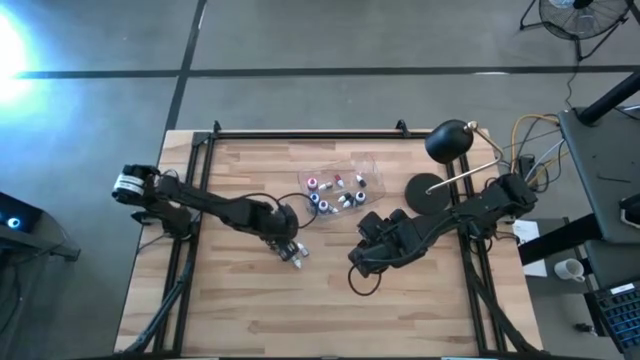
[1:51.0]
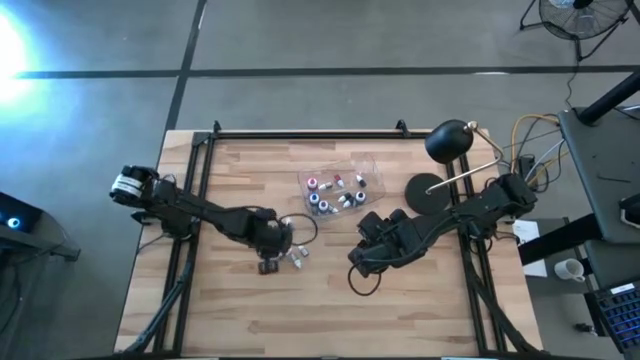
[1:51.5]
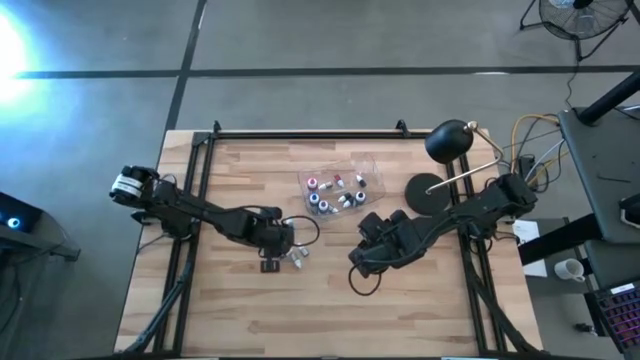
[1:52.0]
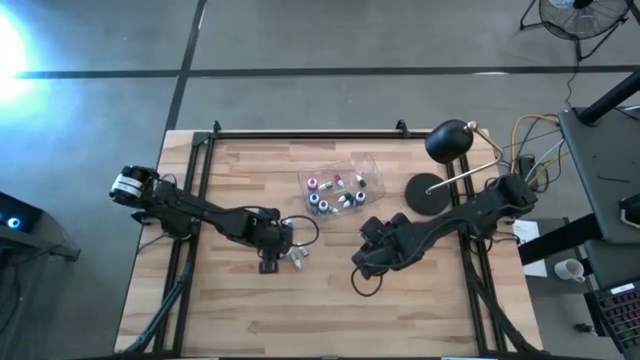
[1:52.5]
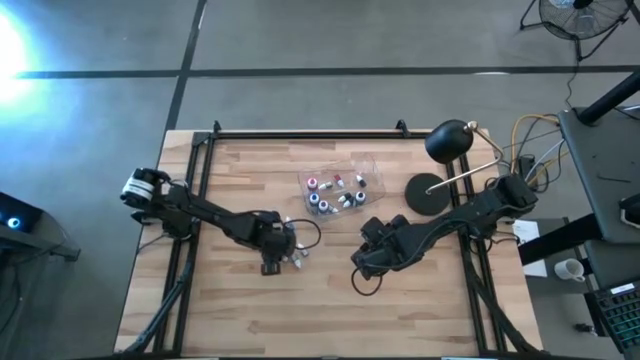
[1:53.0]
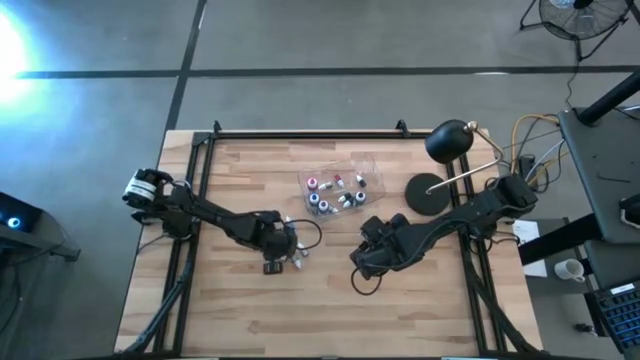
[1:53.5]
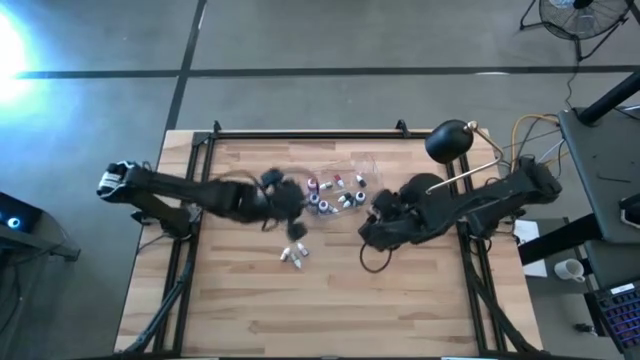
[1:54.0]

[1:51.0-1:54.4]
Task: Pick & Place food coloring
Put the small black food coloring bottle into the transparent bin

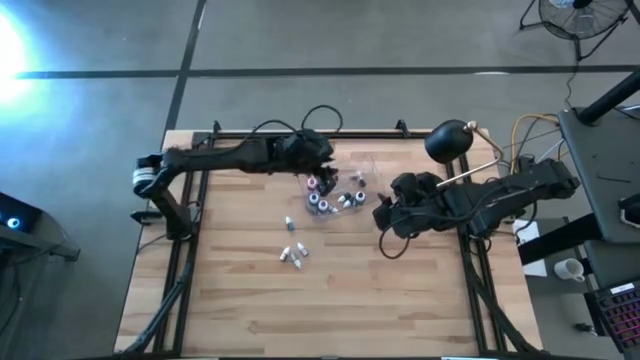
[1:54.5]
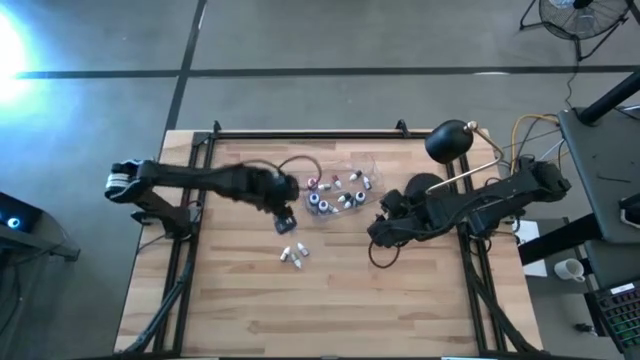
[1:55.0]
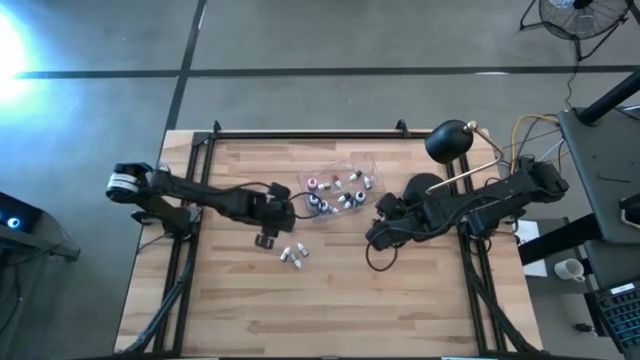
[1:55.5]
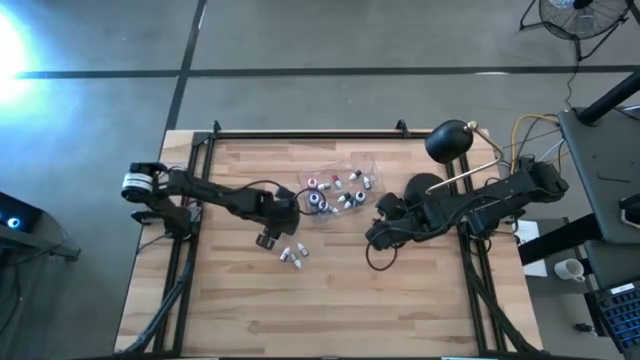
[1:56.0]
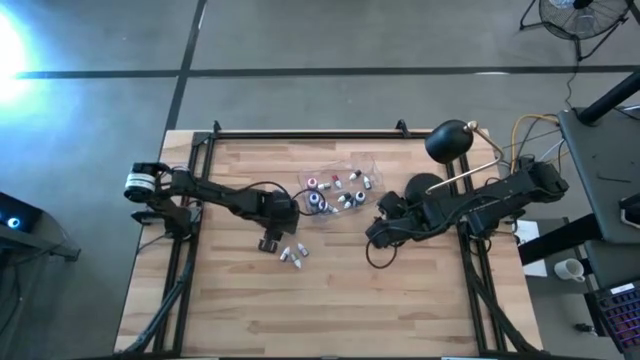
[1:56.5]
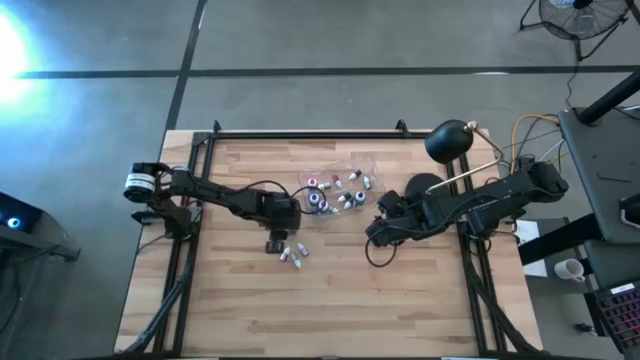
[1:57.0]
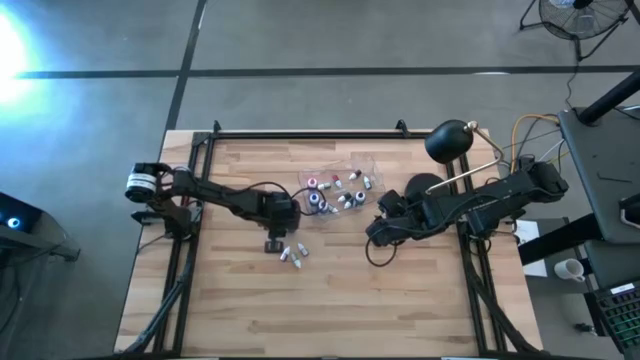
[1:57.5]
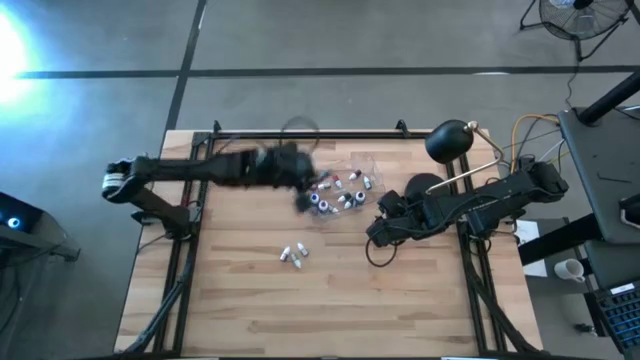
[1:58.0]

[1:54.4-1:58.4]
Put the small blue food coloring bottle into the transparent bin

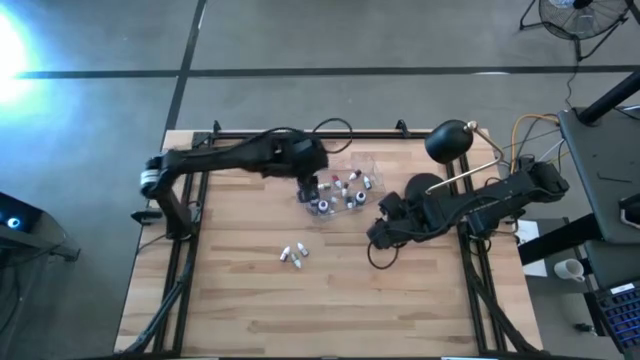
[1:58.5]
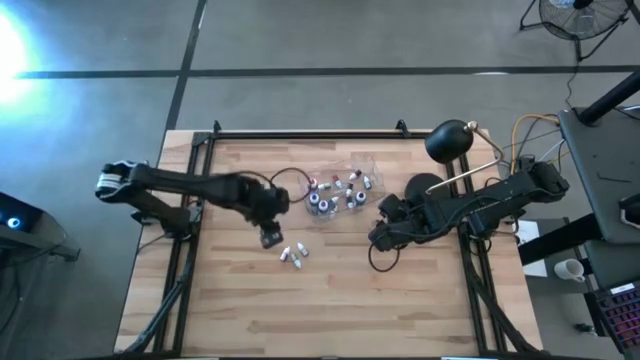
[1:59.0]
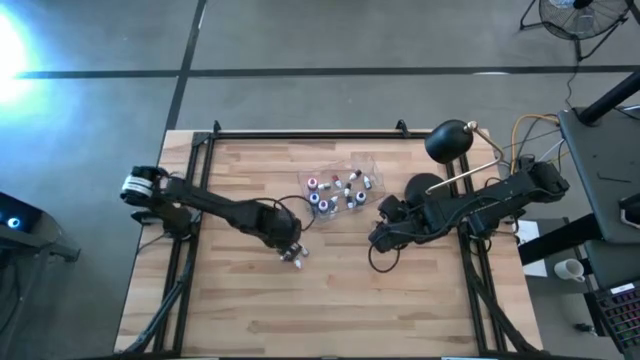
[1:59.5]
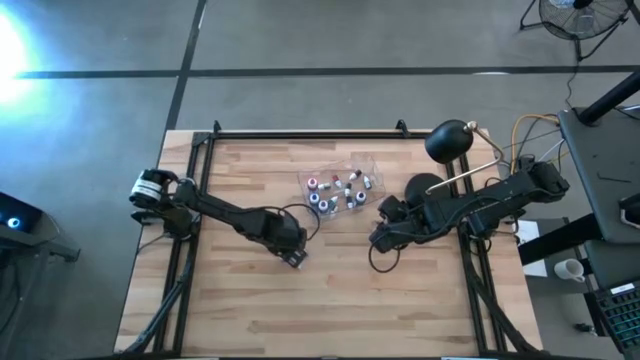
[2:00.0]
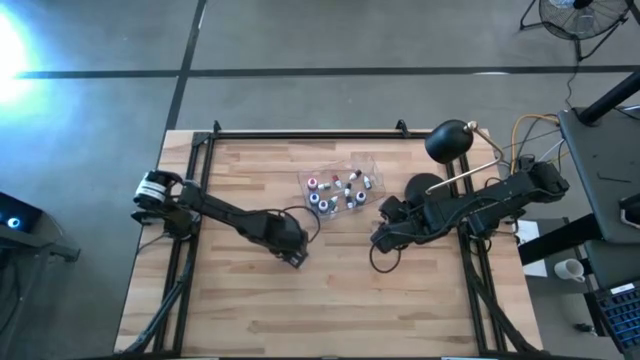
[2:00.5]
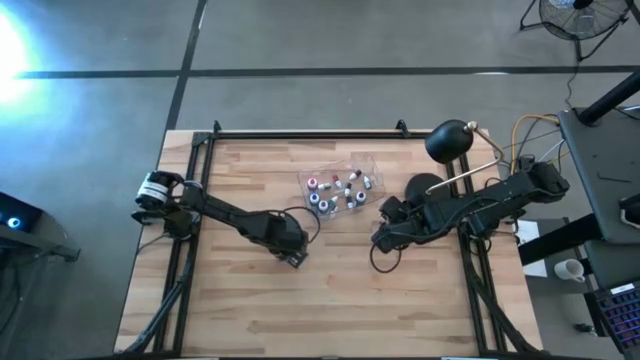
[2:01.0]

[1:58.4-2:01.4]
Put the small orange food coloring bottle into the transparent bin

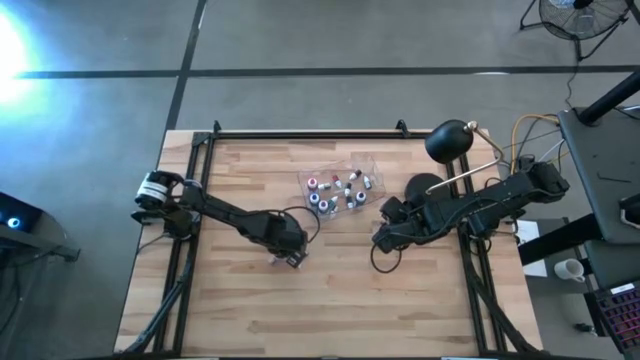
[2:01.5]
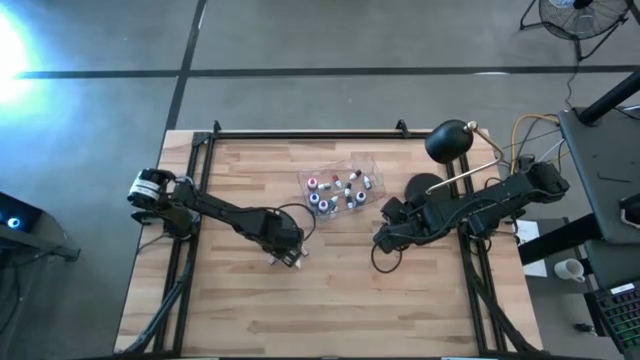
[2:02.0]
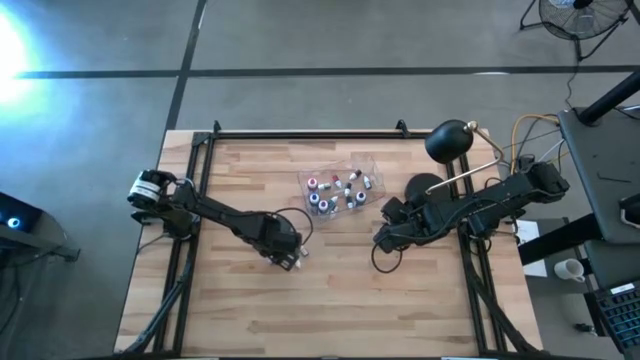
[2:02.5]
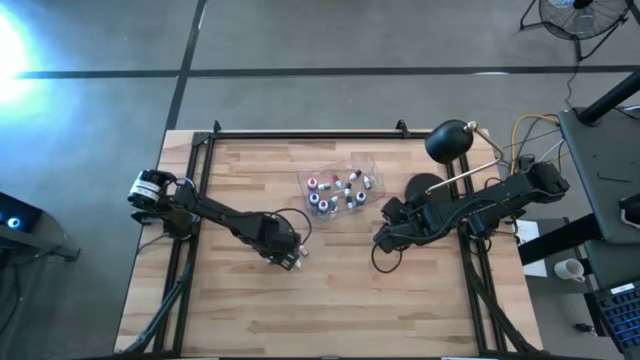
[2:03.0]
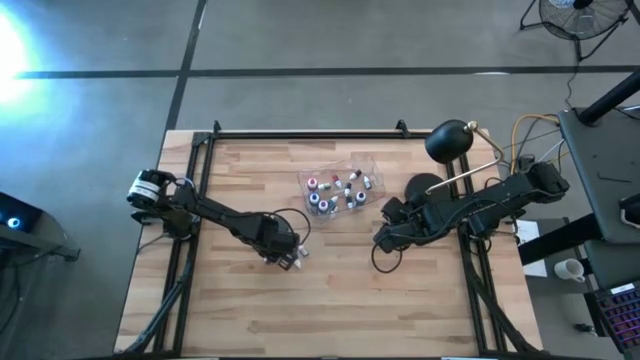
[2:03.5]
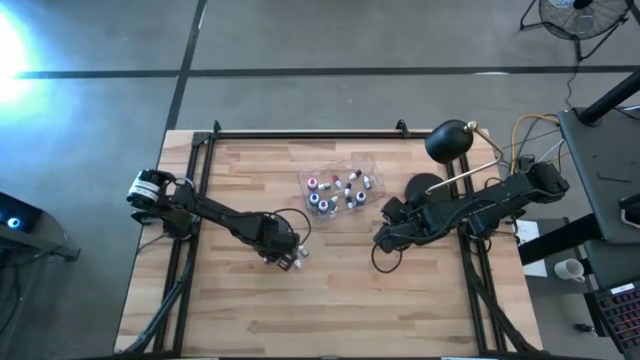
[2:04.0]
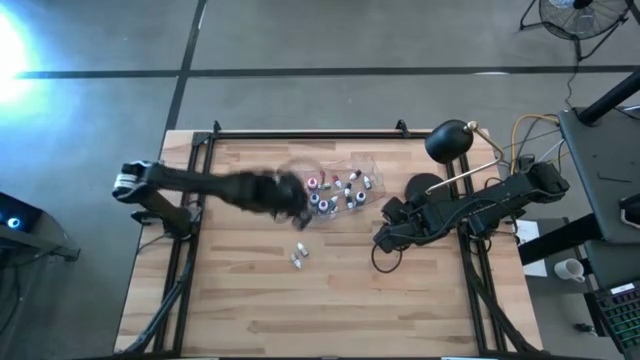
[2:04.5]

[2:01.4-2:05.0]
Put the small orange food coloring bottle into the transparent bin

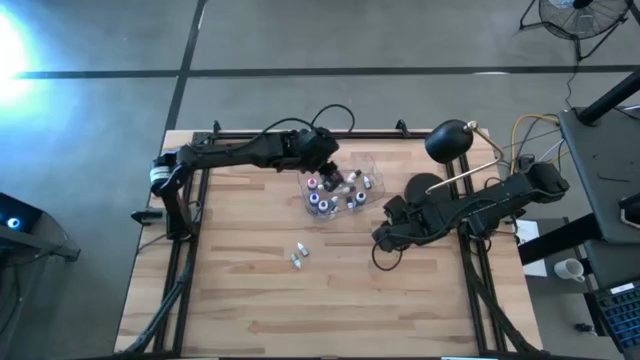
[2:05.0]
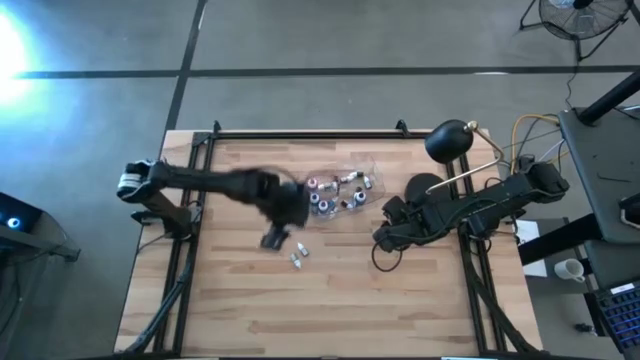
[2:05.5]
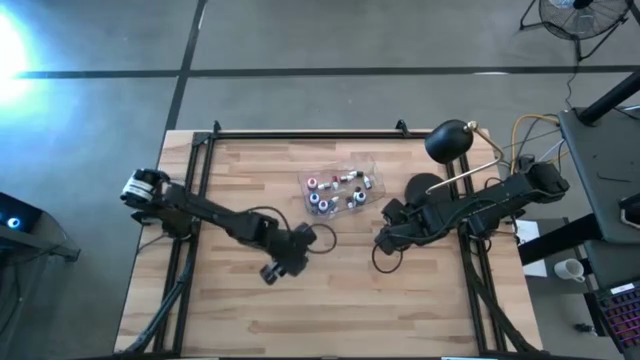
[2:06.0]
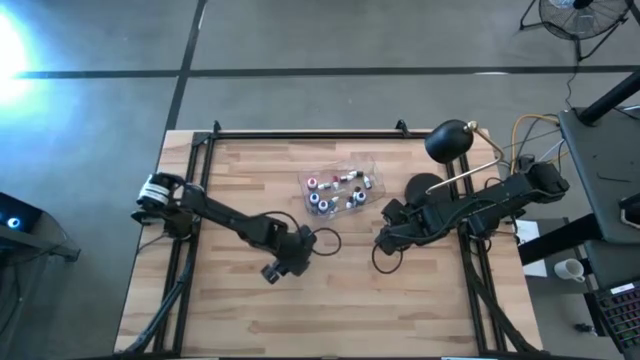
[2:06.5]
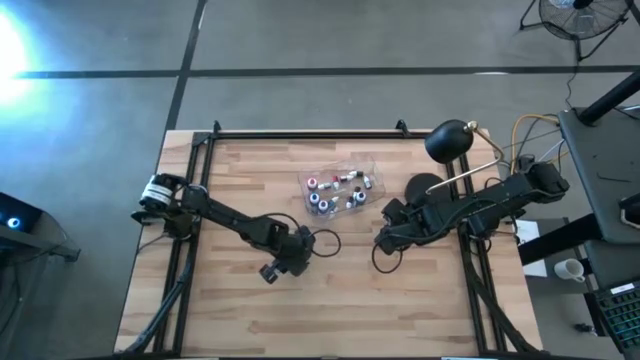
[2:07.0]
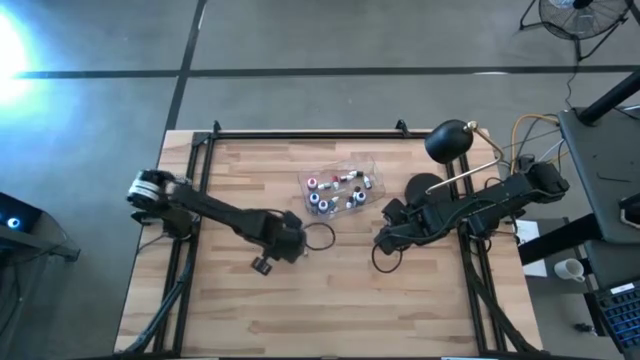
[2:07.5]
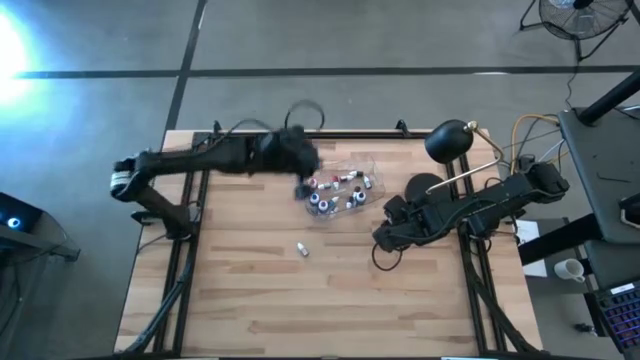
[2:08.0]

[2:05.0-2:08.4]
Put the small green food coloring bottle into the transparent bin

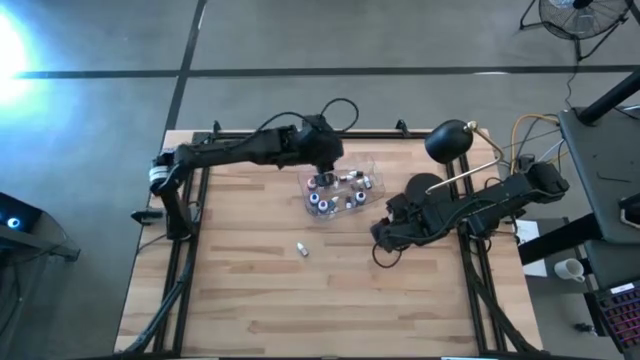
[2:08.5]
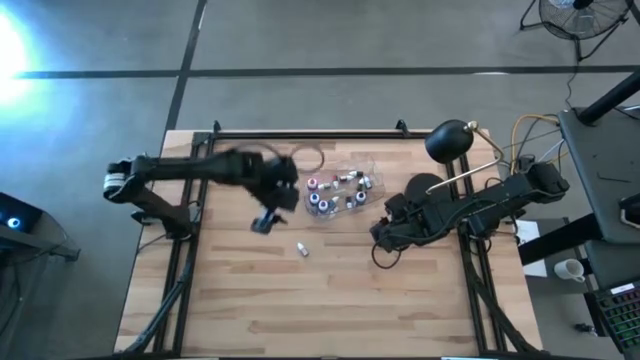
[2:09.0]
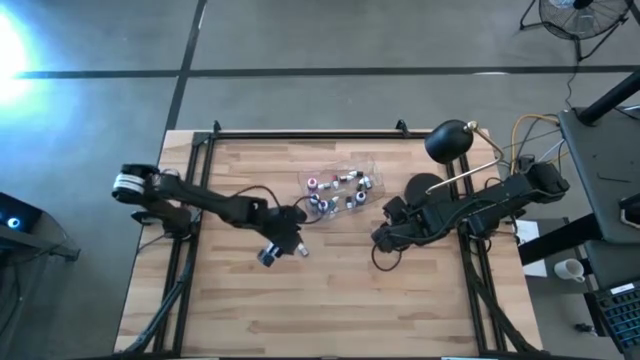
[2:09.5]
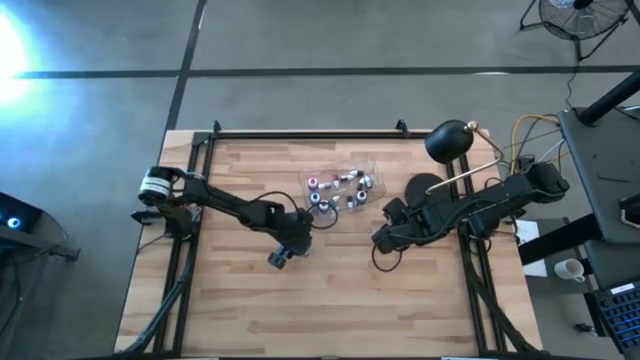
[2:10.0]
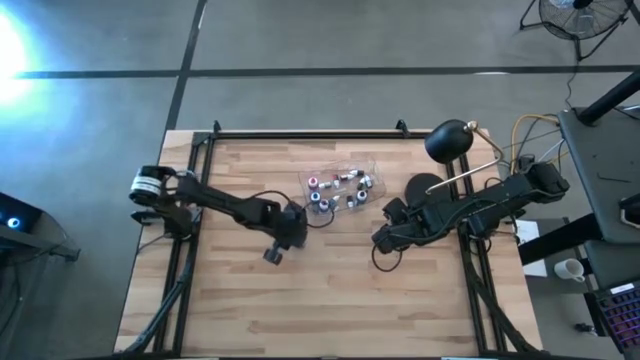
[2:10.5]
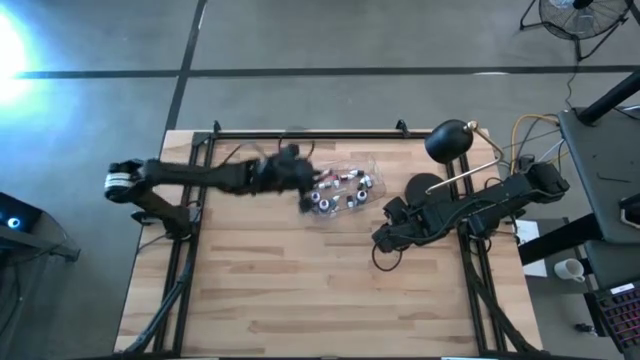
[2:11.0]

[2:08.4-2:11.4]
Put the small red food coloring bottle into the transparent bin
